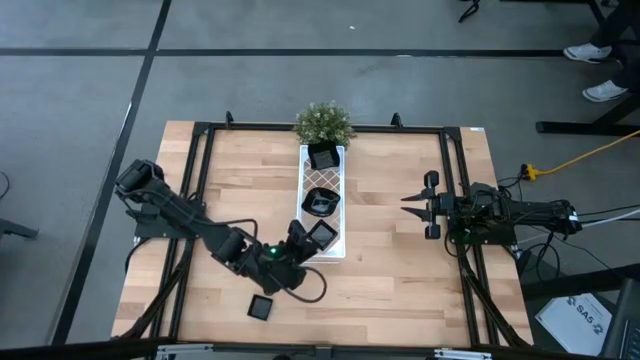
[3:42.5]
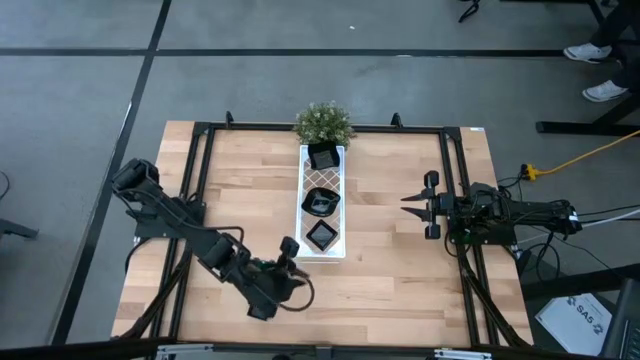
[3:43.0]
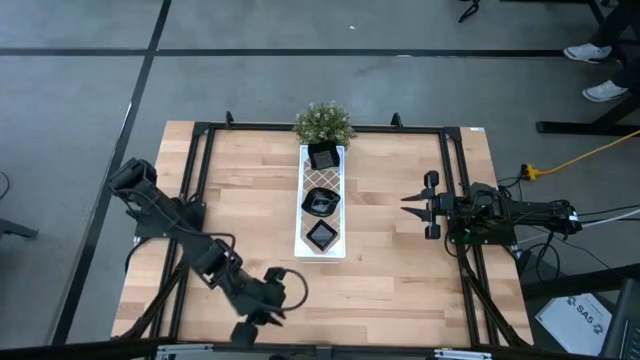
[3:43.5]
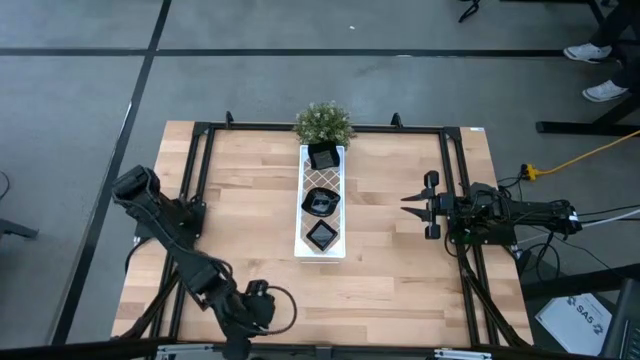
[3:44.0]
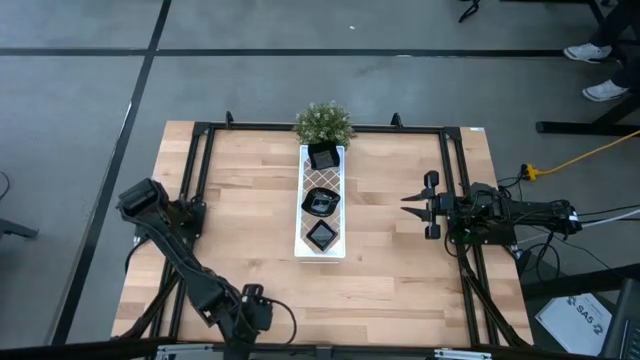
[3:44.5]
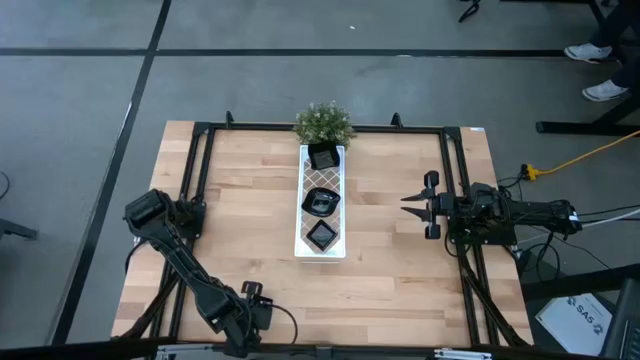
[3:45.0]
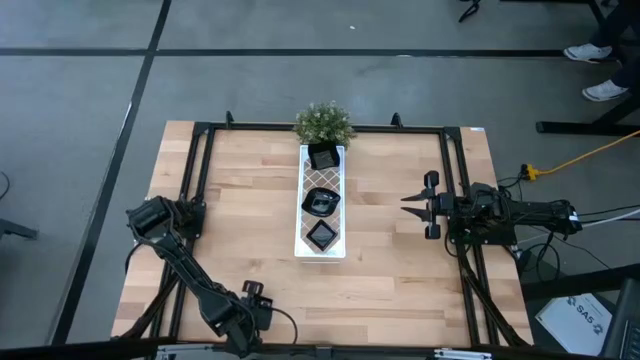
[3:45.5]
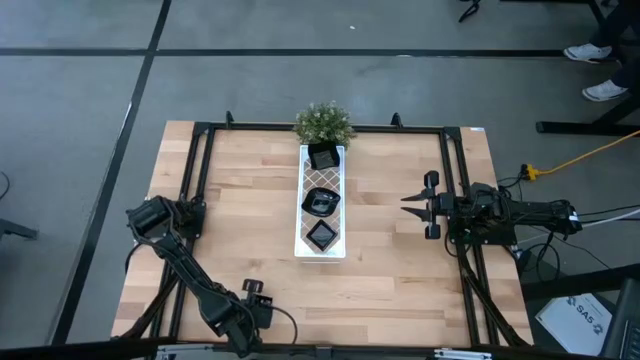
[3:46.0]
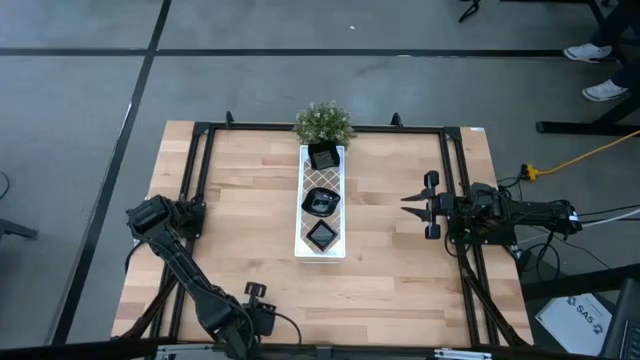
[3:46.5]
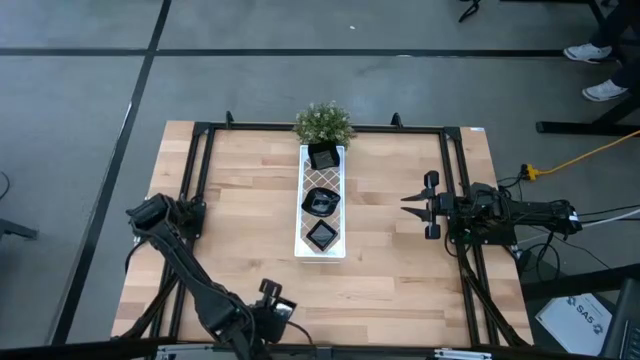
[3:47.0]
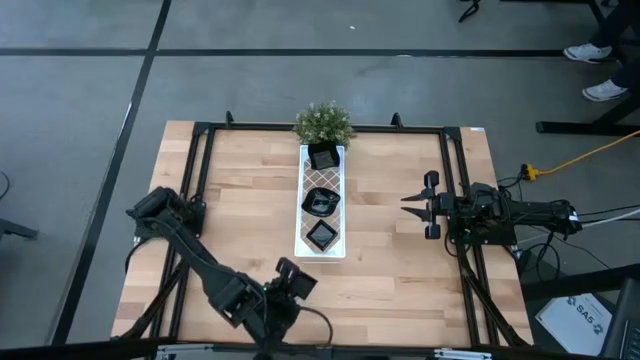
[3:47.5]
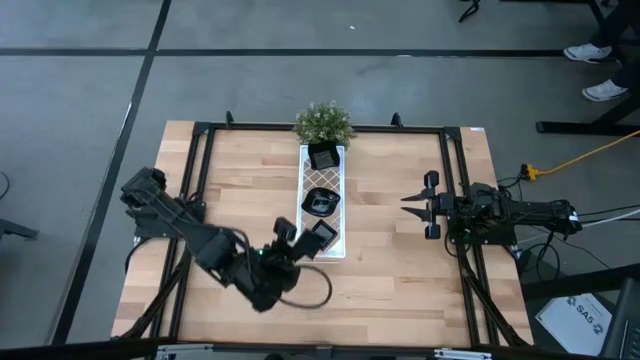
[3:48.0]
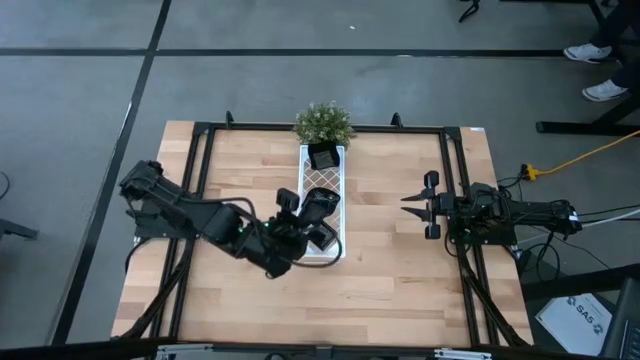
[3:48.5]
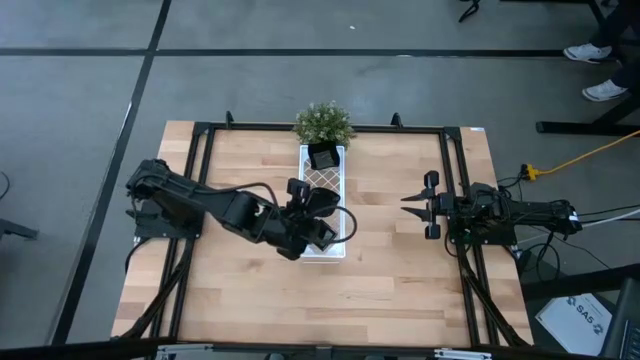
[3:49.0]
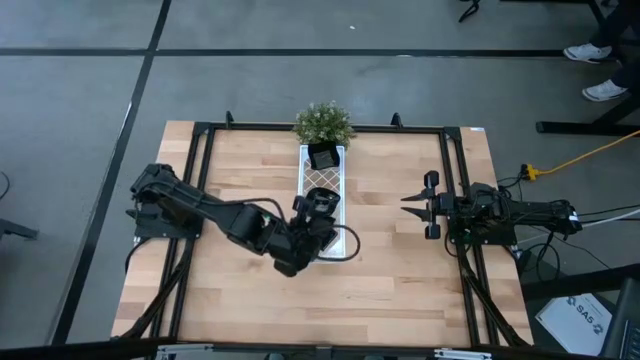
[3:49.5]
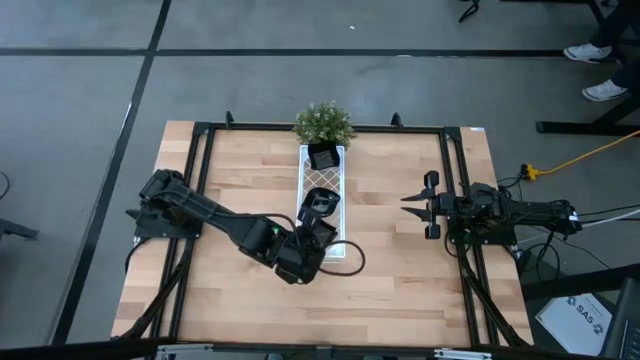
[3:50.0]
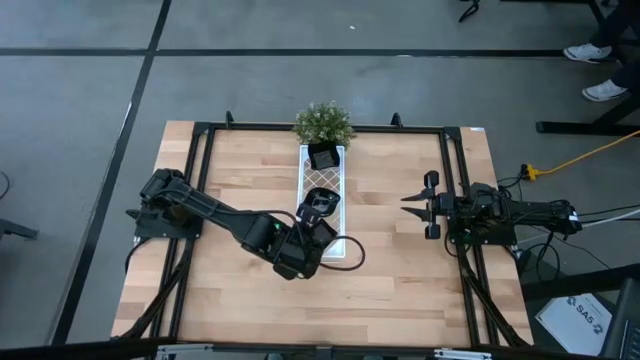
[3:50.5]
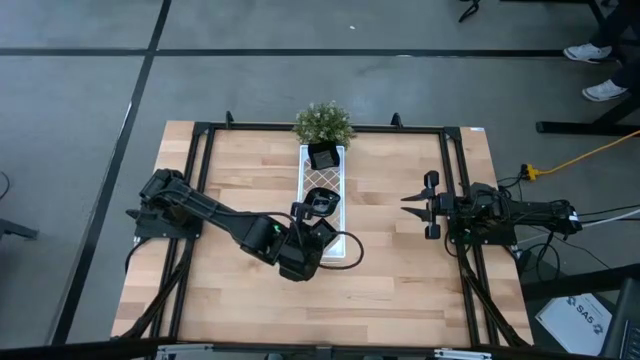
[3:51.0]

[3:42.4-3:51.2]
Task: Pick & Place Mini shaped plates
Stack the square plate on top of the square plate on the shelf

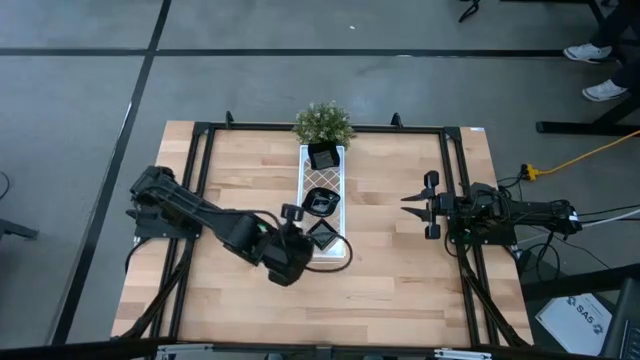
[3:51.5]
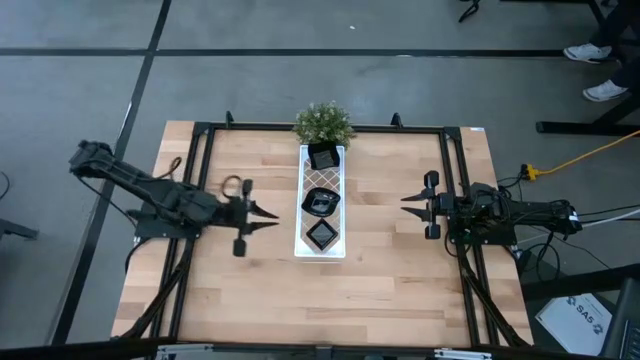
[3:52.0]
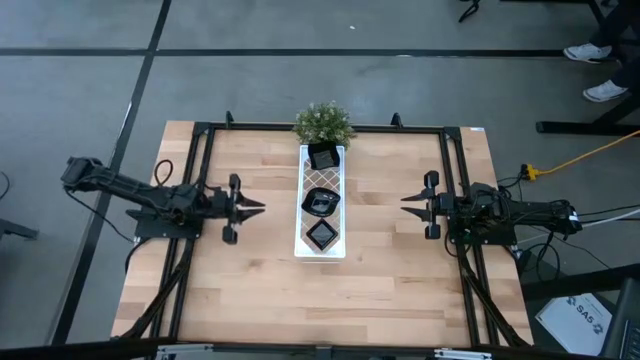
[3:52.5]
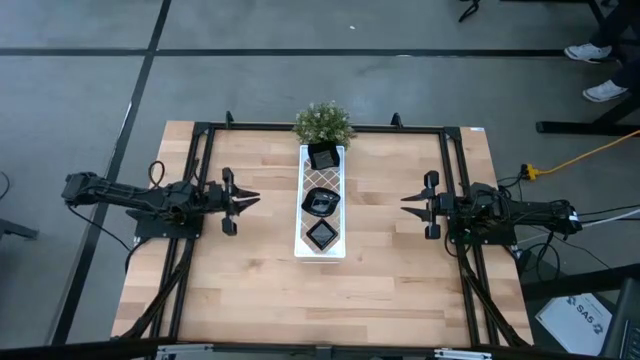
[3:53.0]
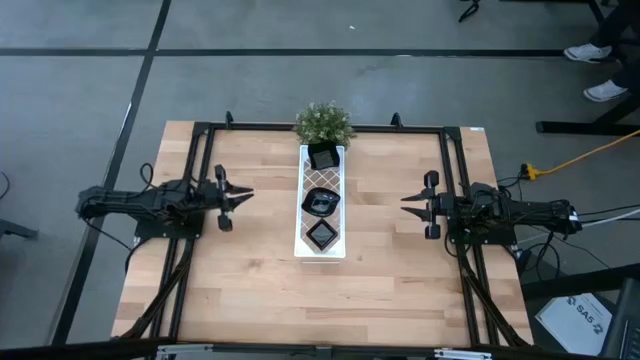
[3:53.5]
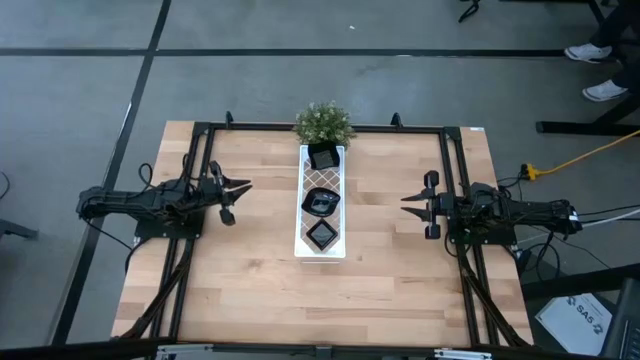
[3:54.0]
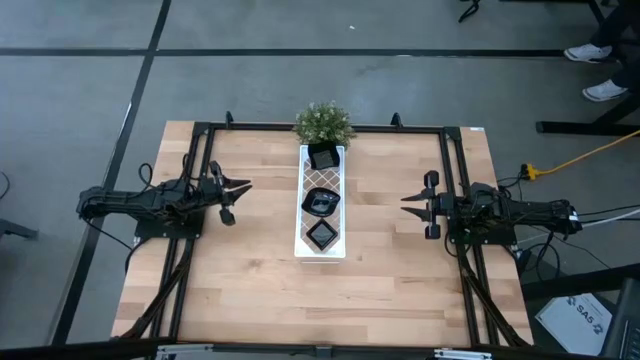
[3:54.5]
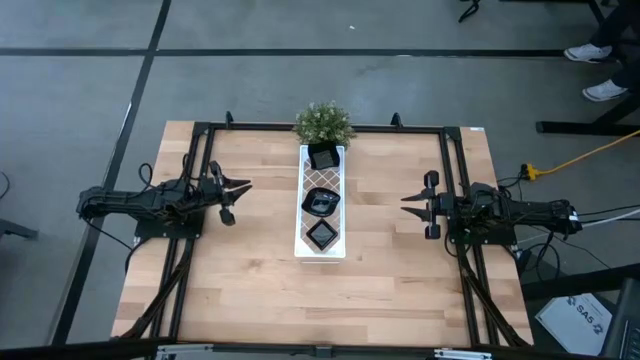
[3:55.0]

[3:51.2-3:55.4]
Return to Home Position

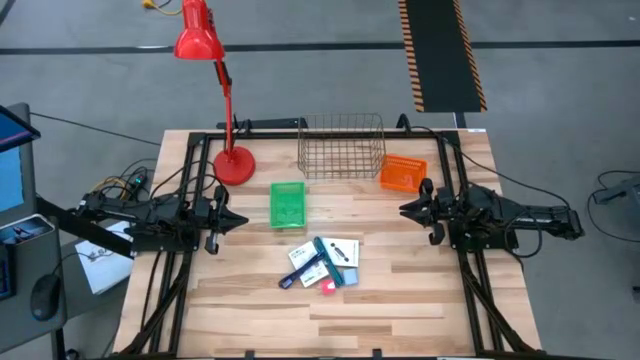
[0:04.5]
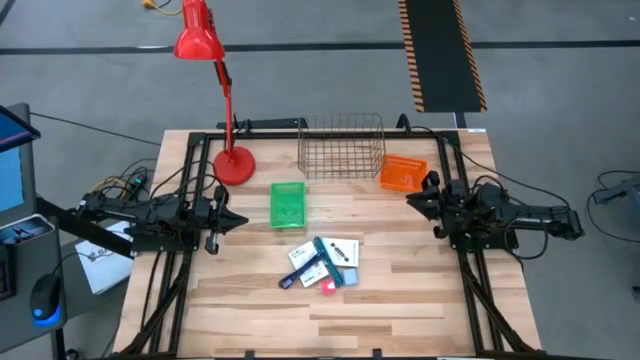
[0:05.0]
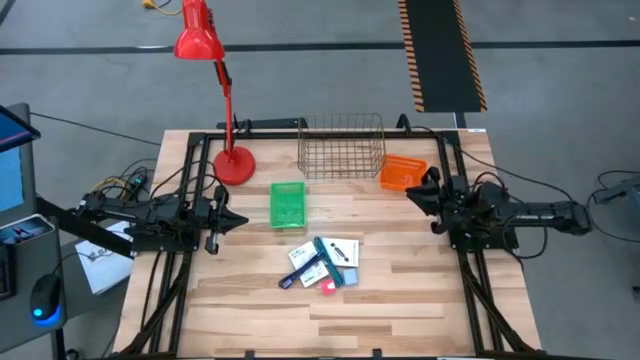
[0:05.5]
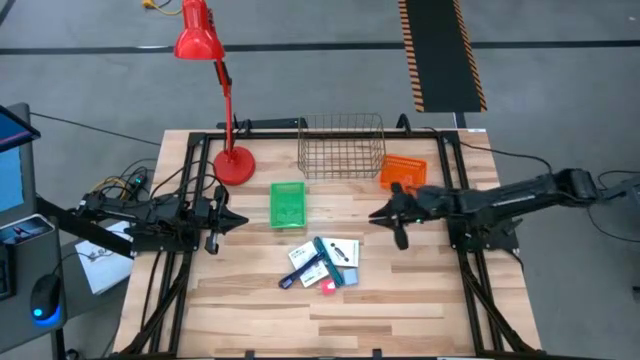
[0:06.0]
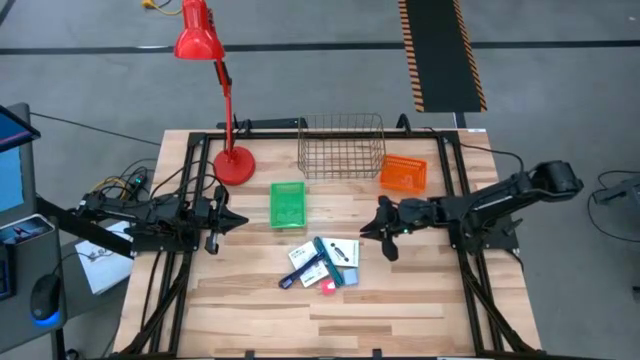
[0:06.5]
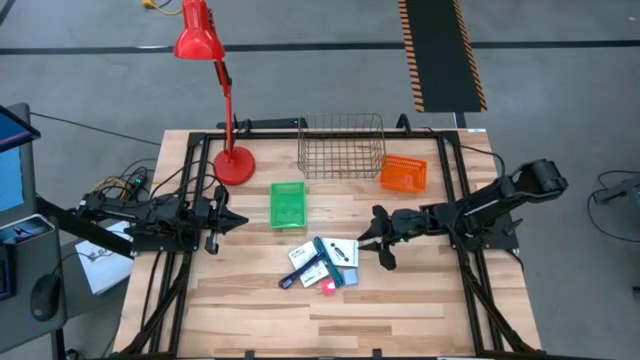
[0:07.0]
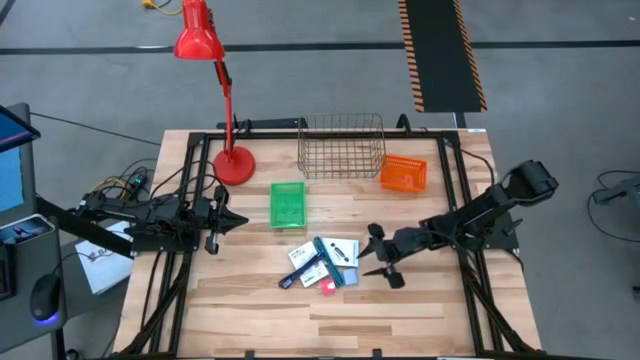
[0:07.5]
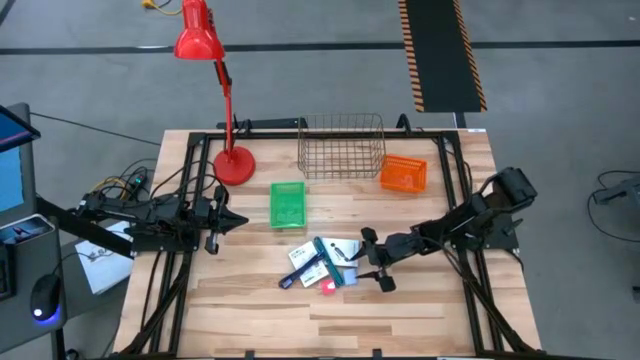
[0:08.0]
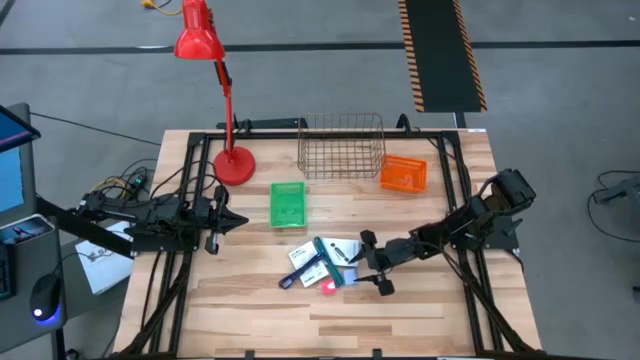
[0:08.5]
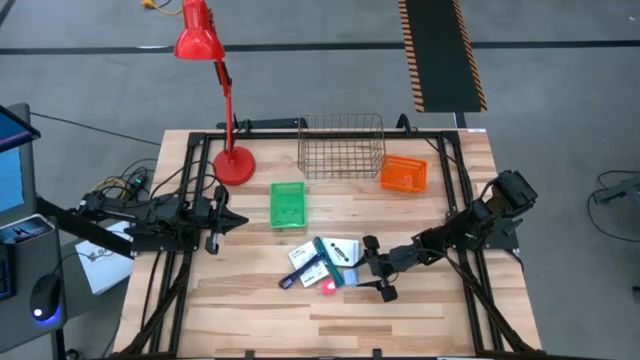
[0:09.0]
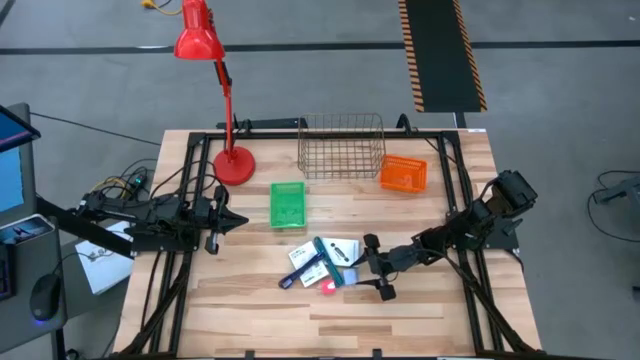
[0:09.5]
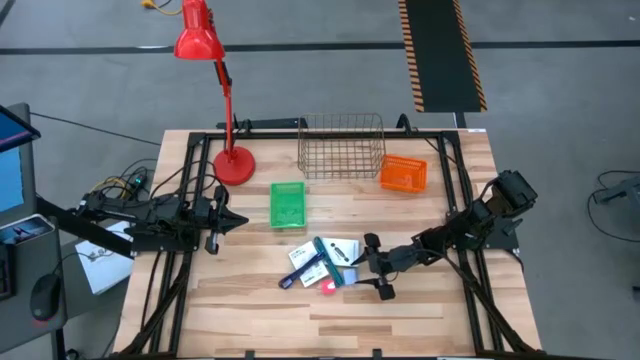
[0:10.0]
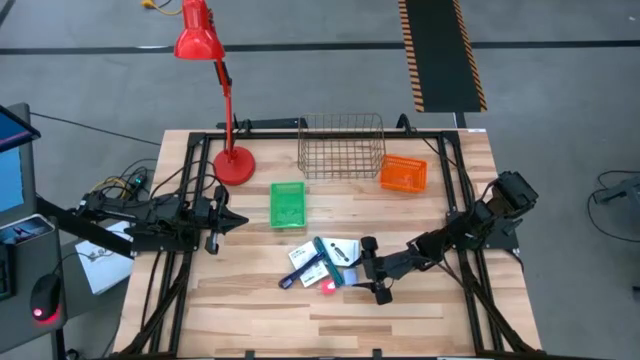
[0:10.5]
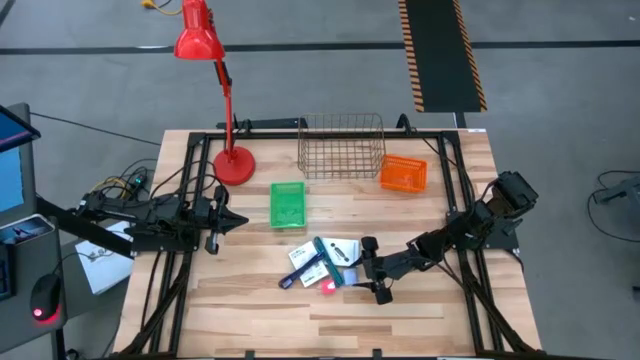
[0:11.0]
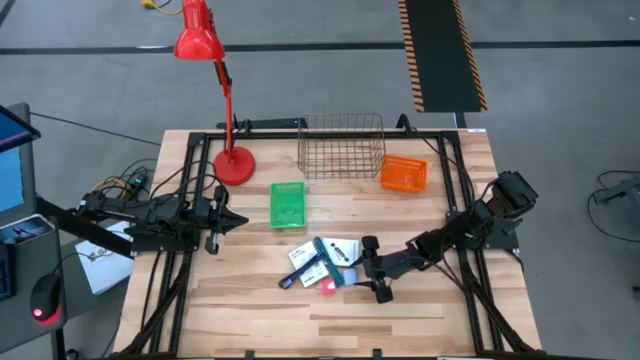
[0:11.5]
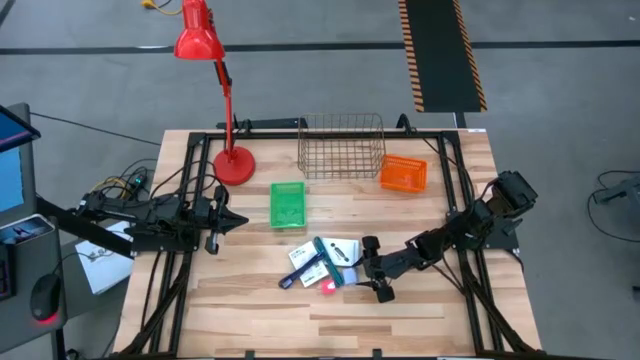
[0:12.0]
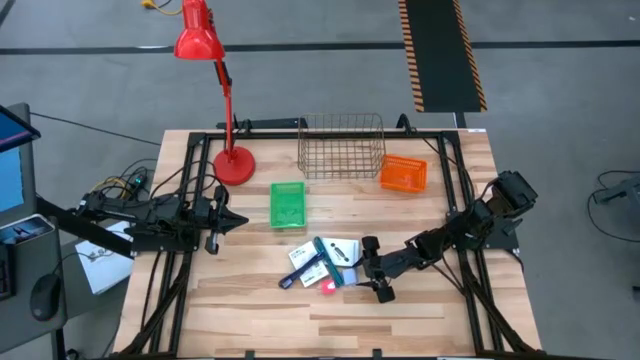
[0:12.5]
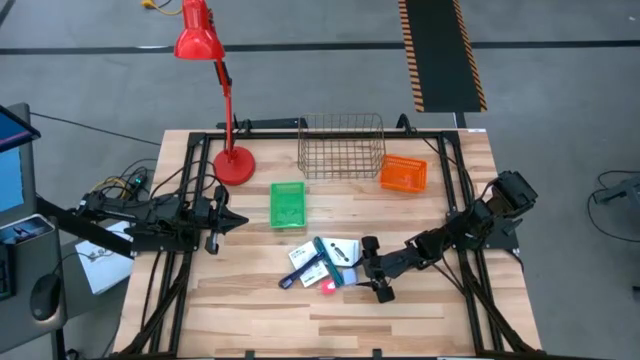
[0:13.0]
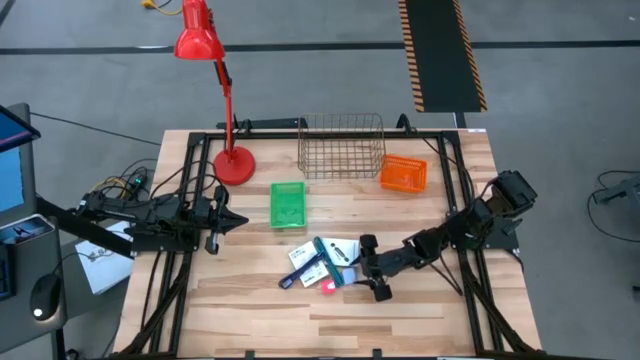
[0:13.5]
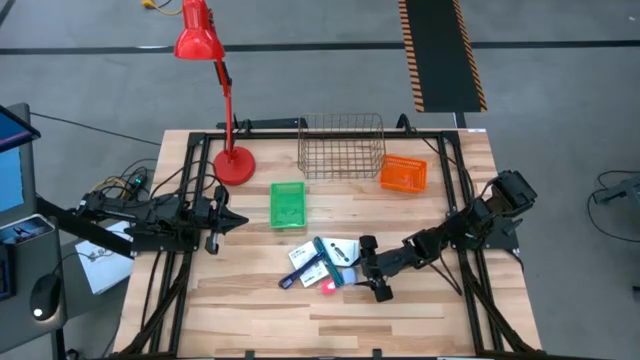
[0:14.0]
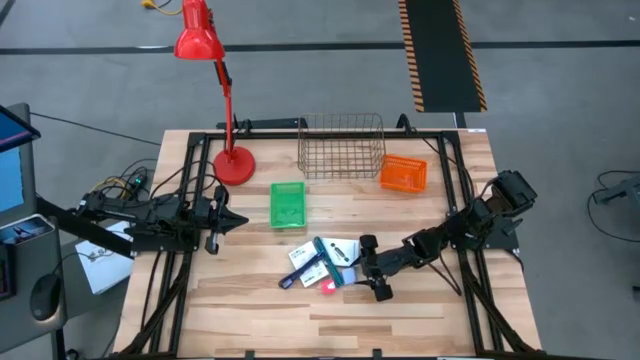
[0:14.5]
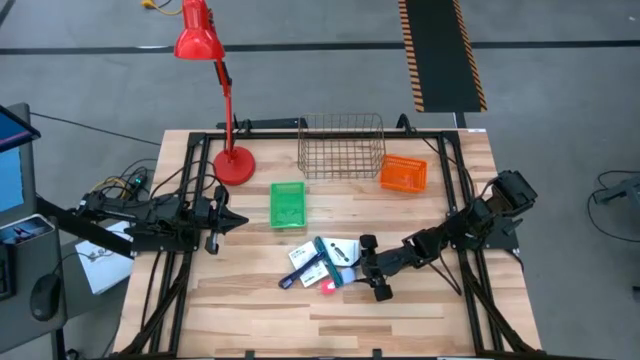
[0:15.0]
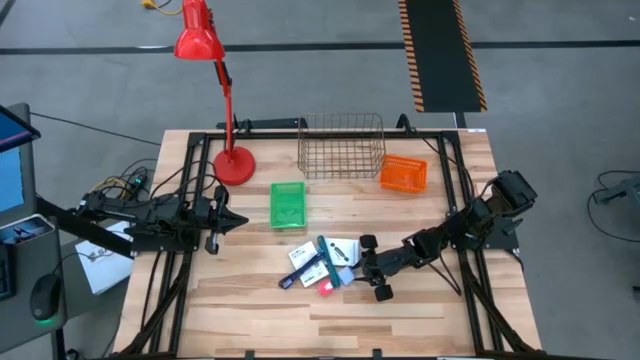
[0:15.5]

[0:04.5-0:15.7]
Task: Pick and place items into bin
Put the white charger adapter into the orange basket
